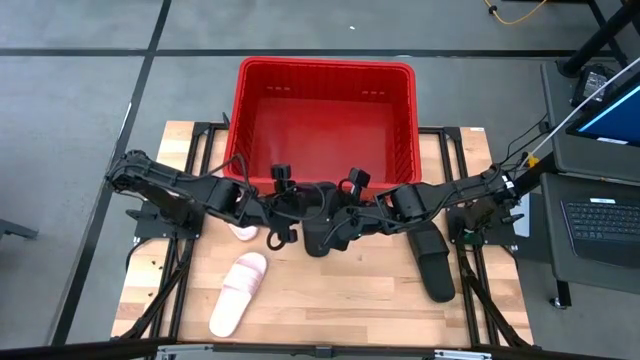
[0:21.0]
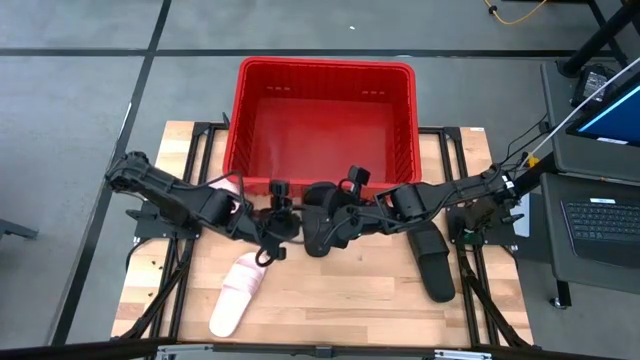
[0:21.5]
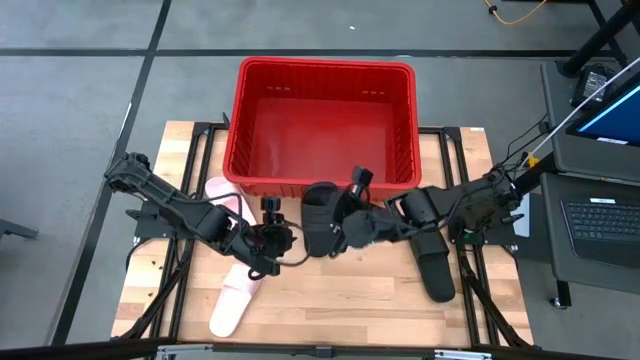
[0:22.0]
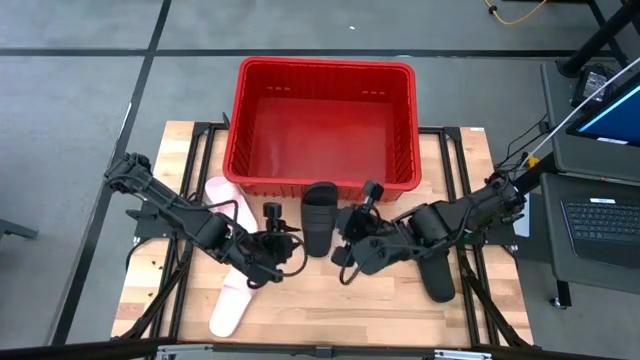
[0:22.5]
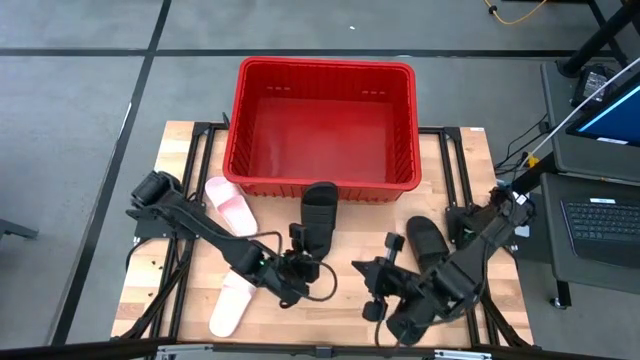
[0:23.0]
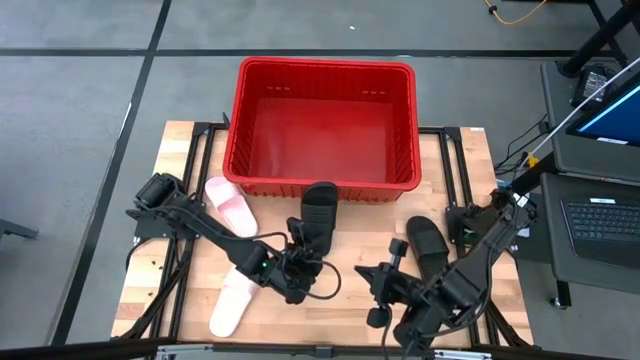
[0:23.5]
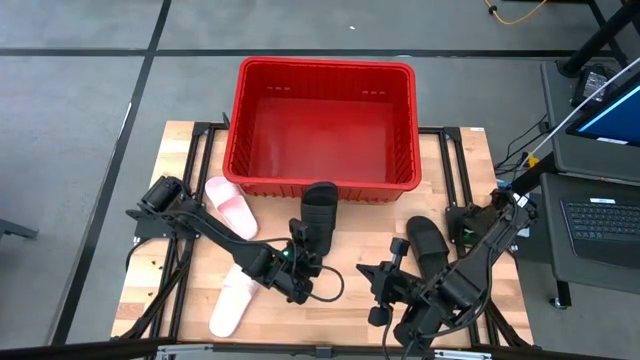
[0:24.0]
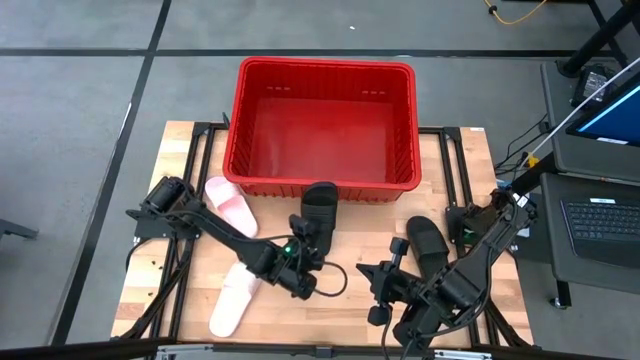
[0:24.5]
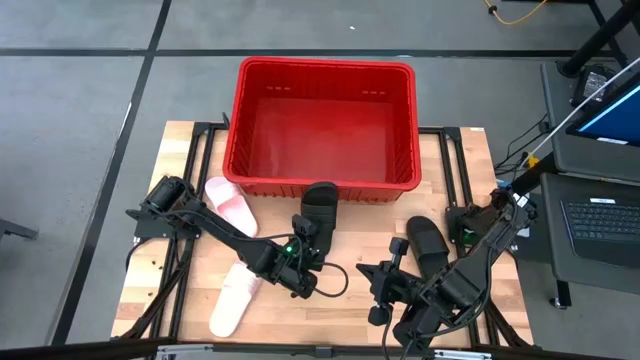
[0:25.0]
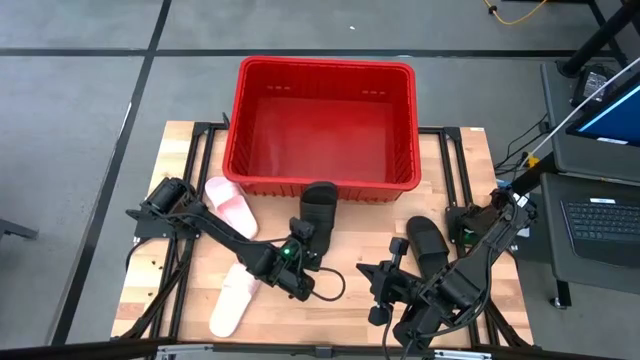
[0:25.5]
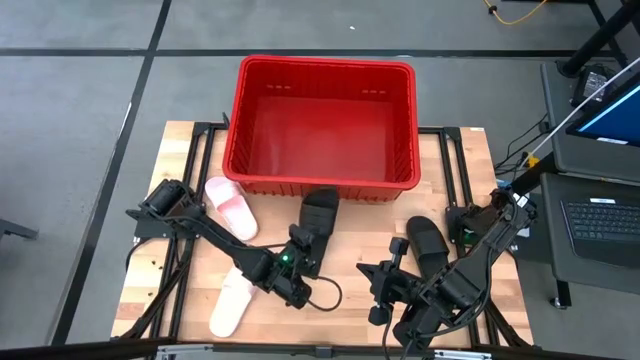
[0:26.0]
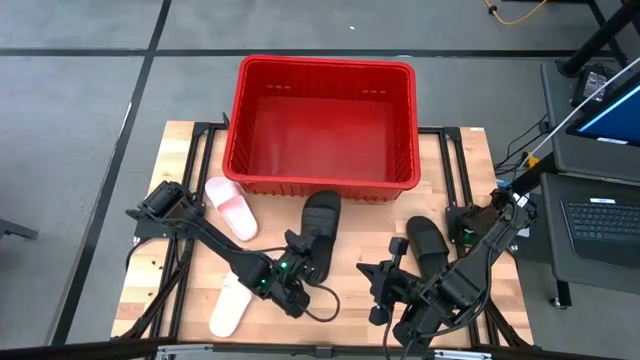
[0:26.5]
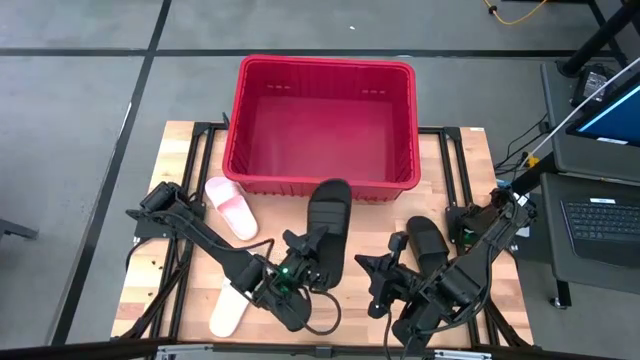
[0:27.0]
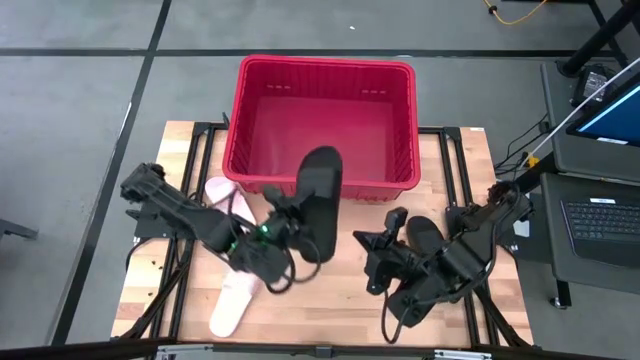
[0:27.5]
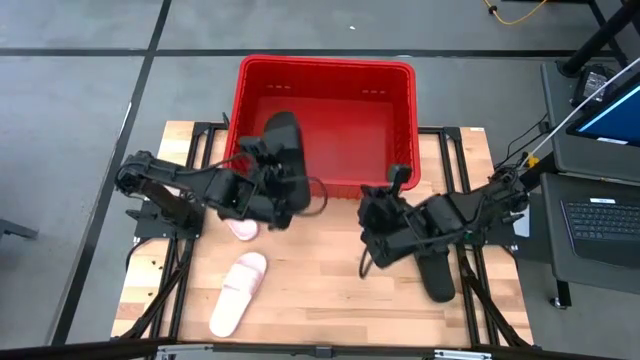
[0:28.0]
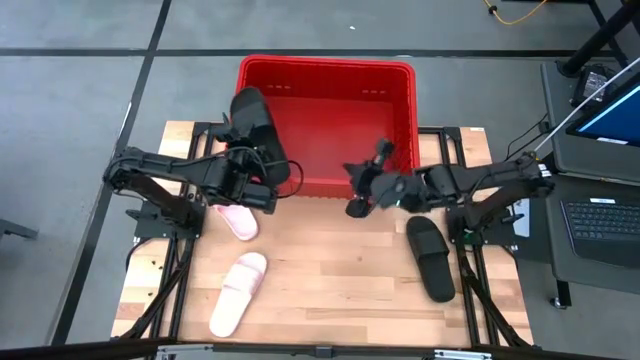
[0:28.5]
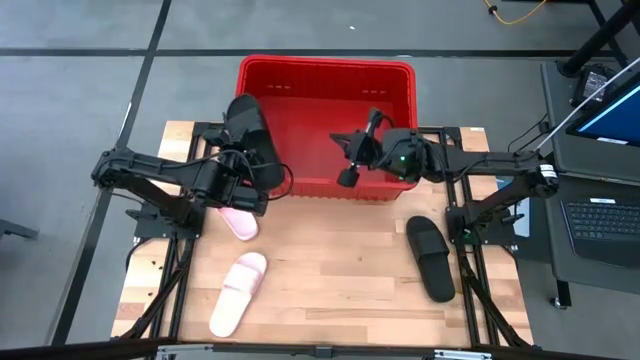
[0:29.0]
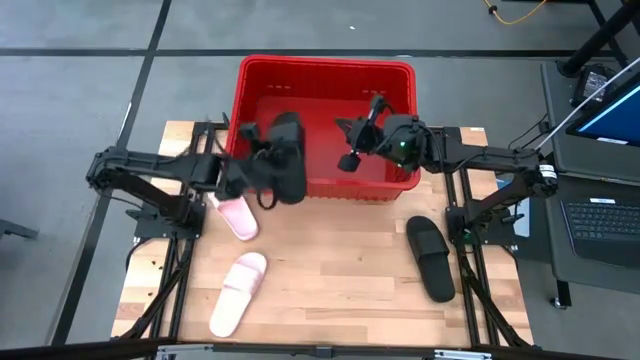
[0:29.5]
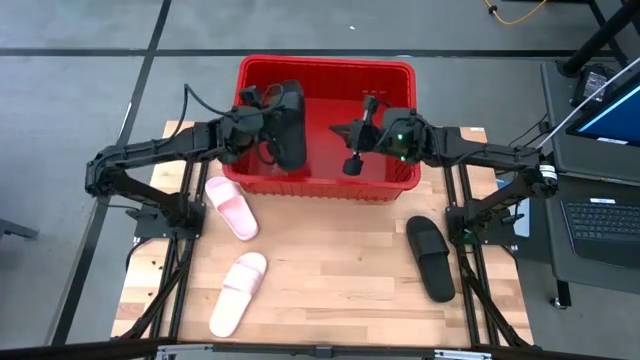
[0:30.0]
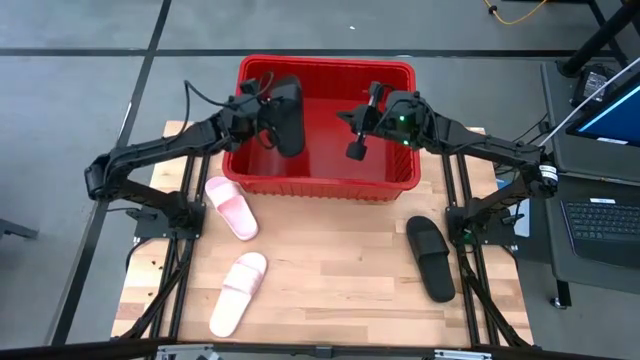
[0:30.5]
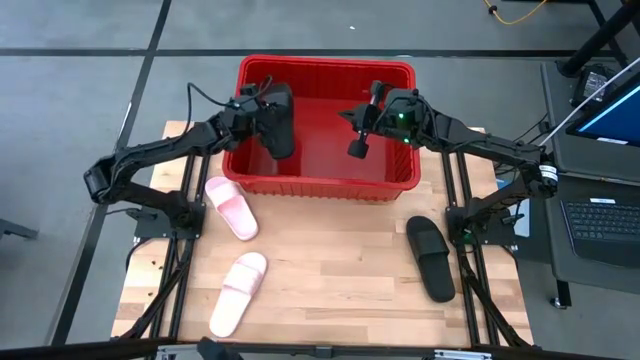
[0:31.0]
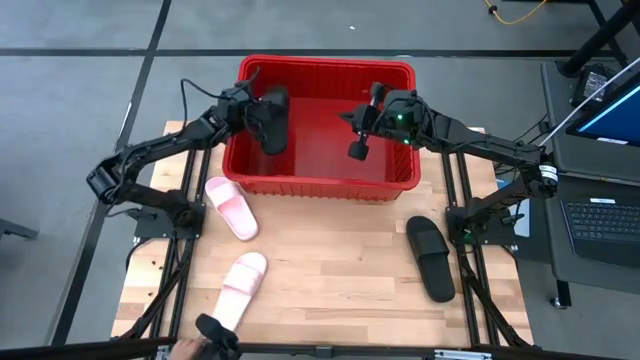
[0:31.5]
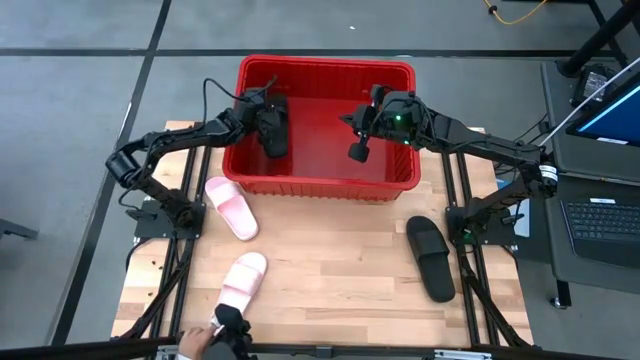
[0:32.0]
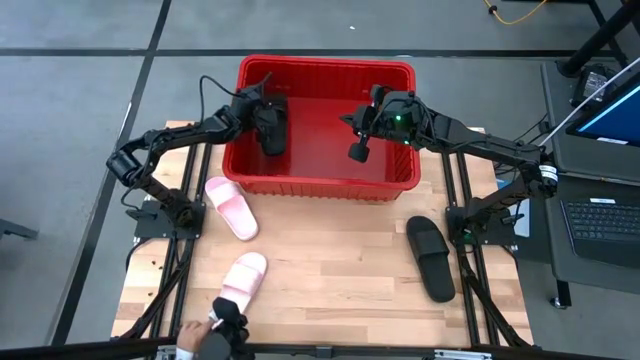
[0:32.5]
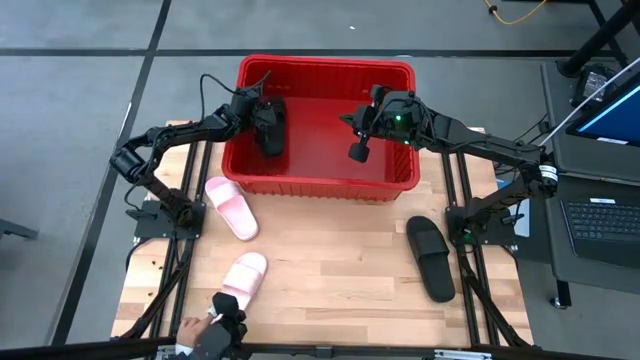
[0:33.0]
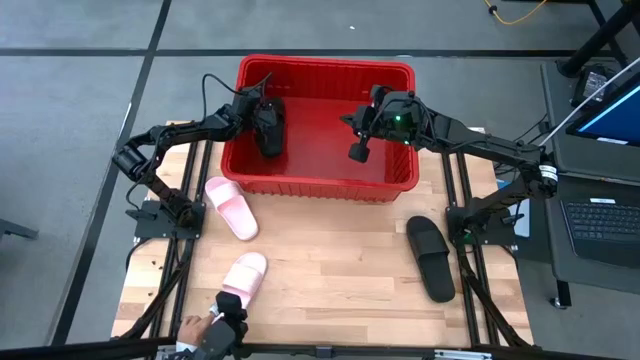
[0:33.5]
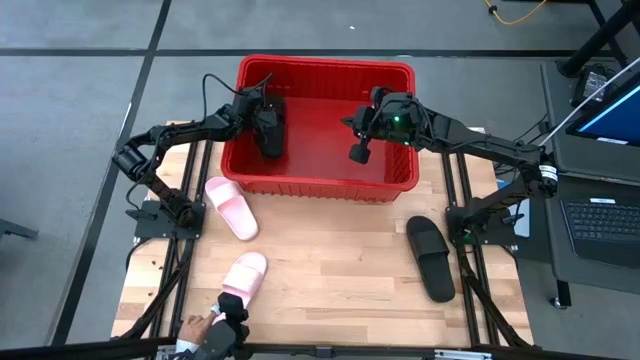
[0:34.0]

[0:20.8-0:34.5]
Task: Pick and place slides into bin
Put the left black slide into the red bin

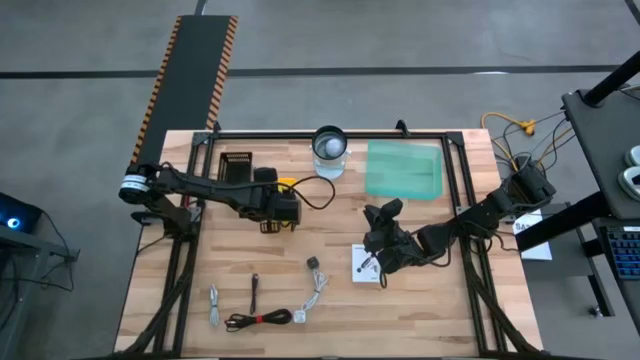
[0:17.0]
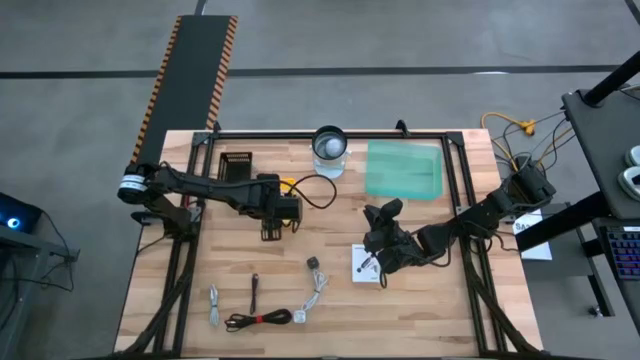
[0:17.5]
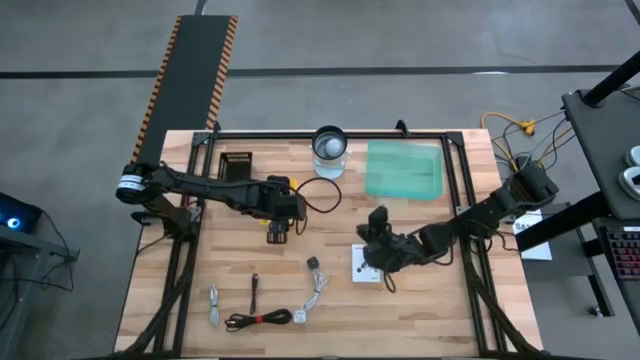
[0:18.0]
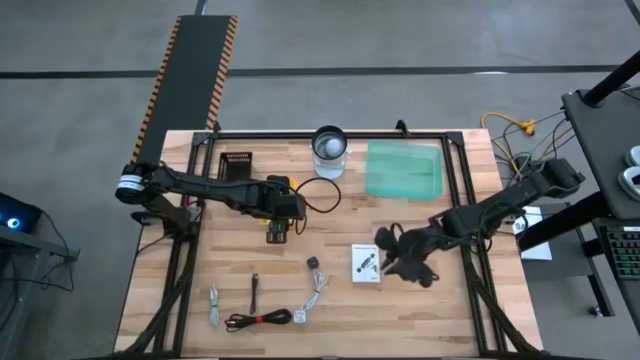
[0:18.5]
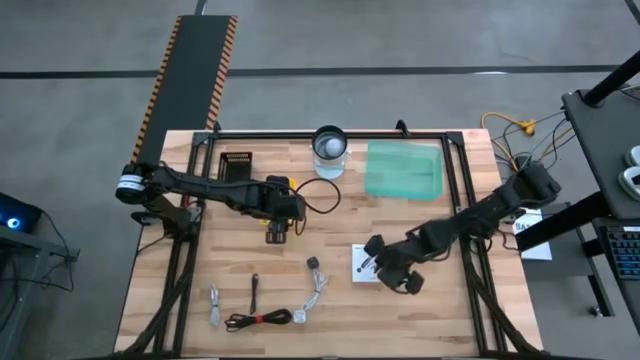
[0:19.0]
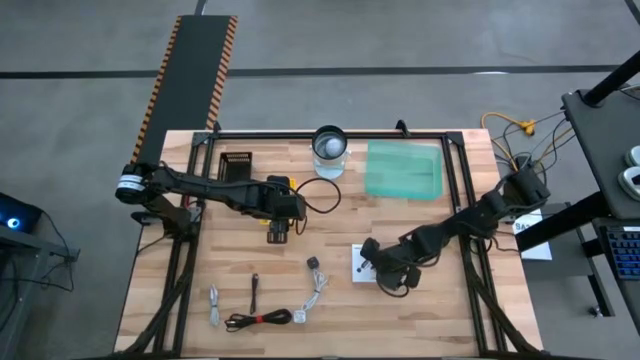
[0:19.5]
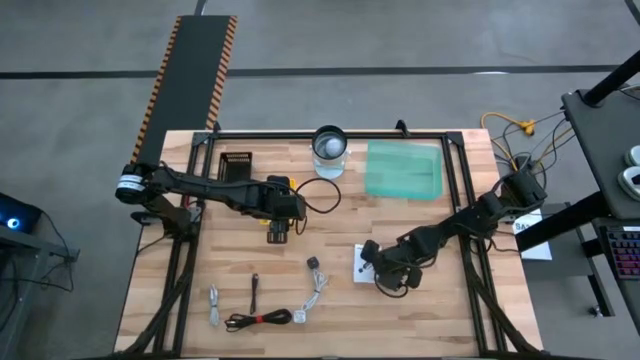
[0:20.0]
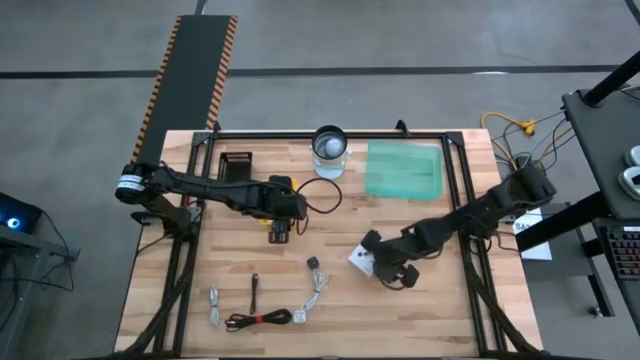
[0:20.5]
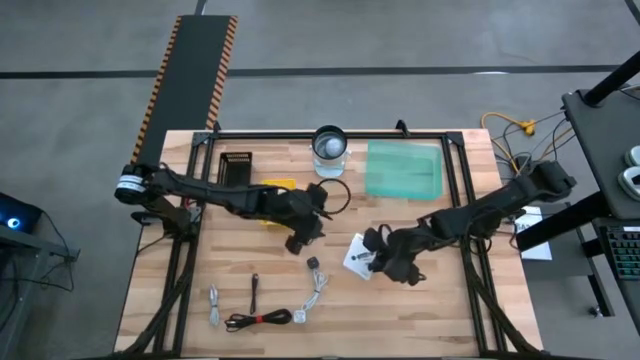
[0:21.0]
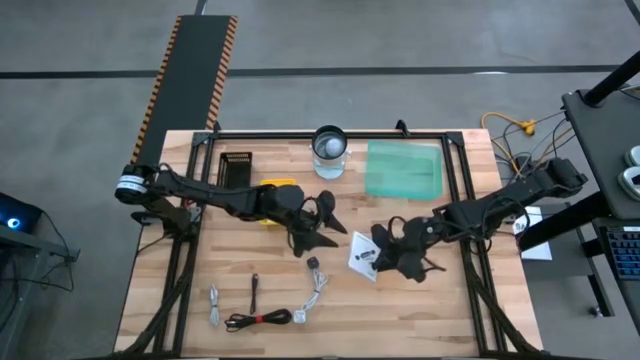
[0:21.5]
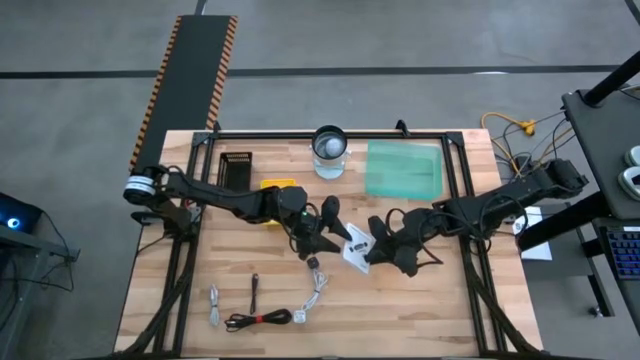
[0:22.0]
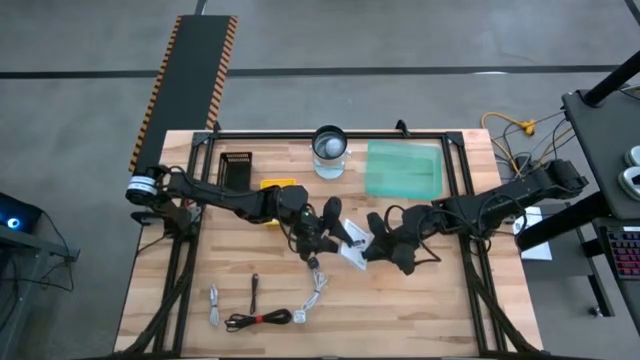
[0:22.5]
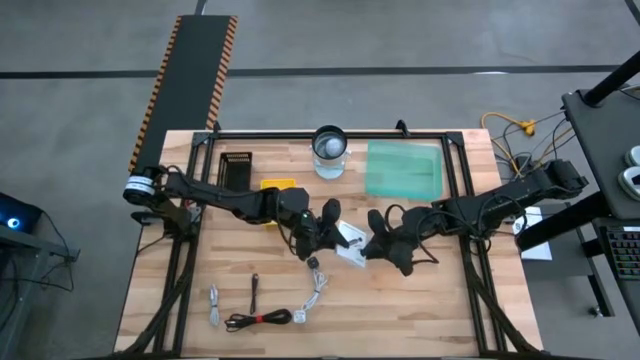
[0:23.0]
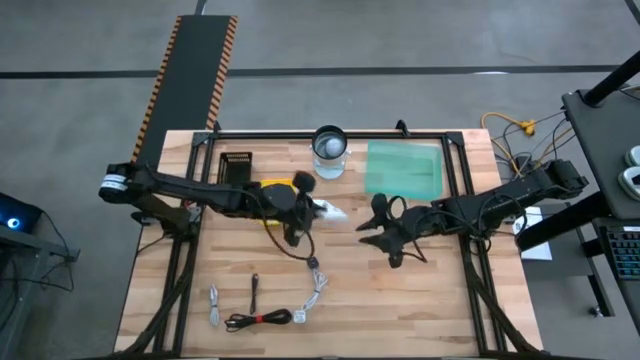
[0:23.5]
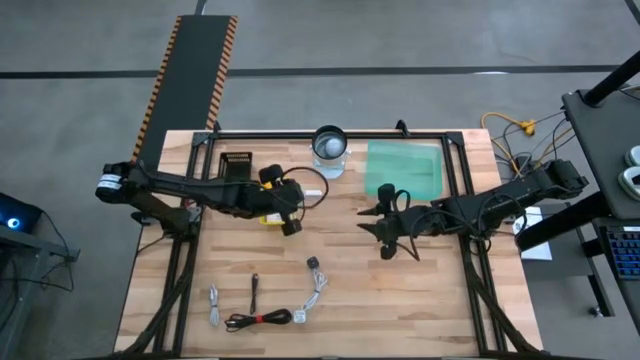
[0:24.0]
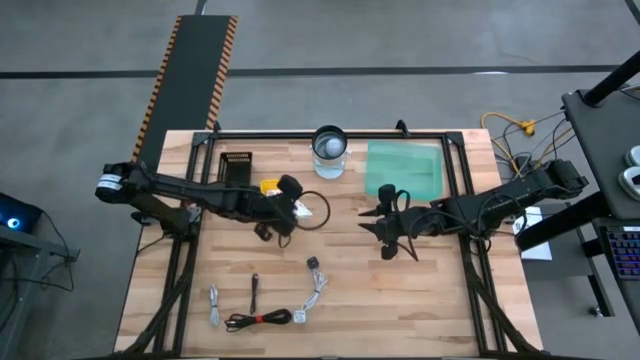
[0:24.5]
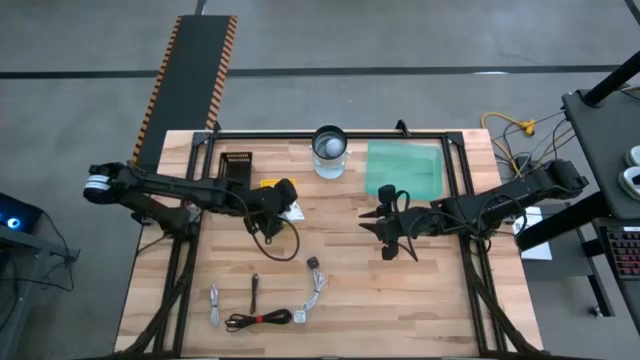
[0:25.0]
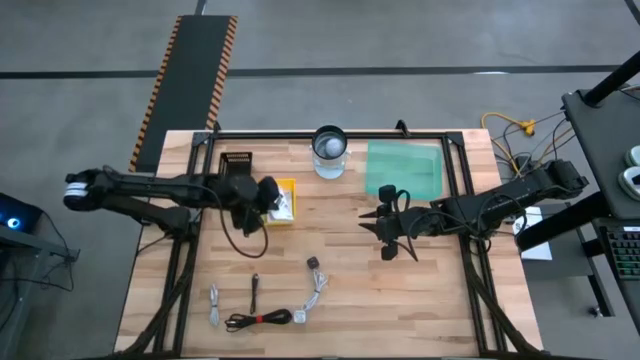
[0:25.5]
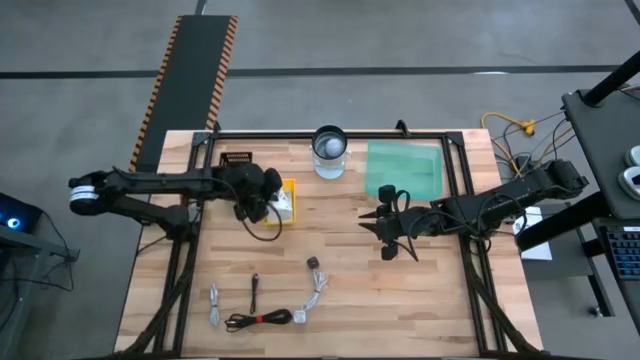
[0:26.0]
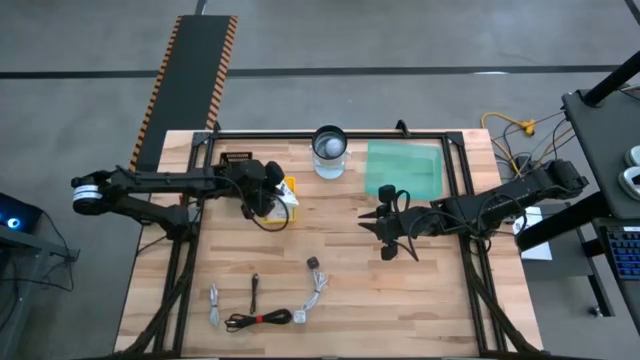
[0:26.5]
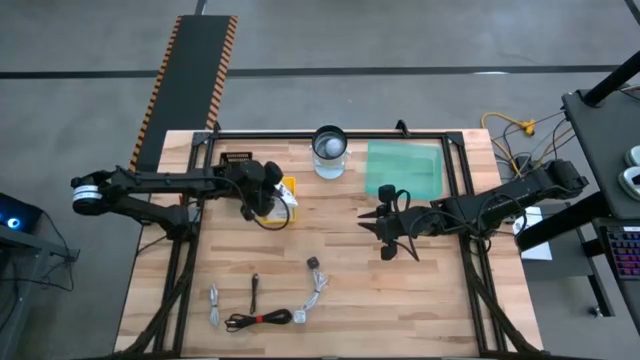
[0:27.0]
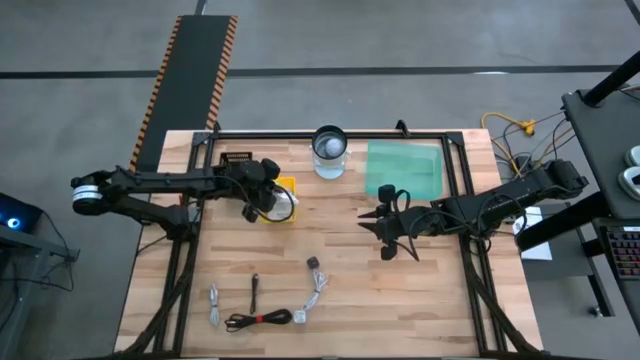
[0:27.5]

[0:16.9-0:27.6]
Task: Pick and place items into bin
Put the white card reader box into the yellow bin
